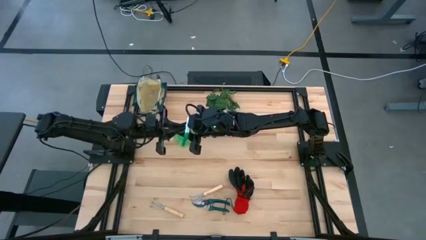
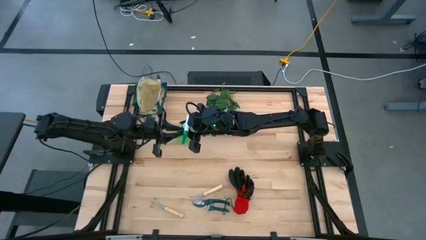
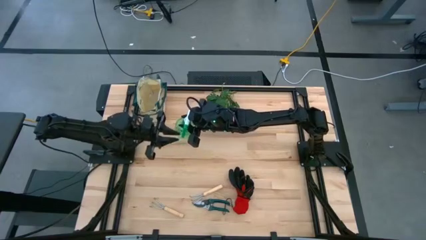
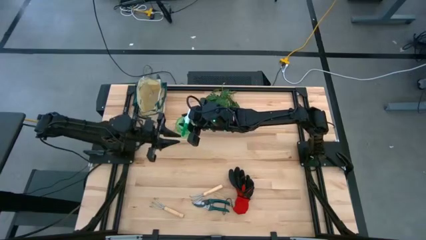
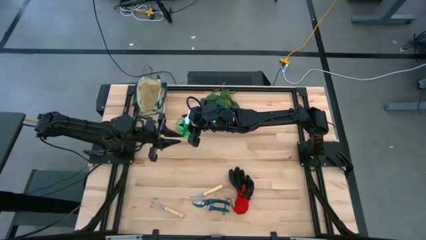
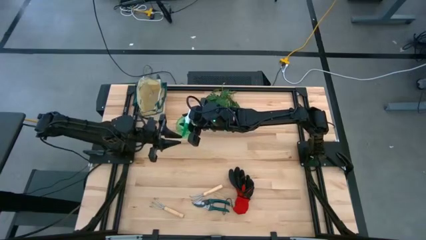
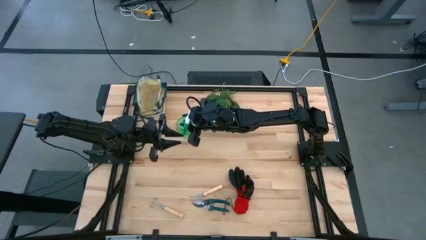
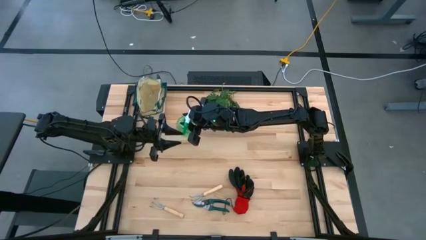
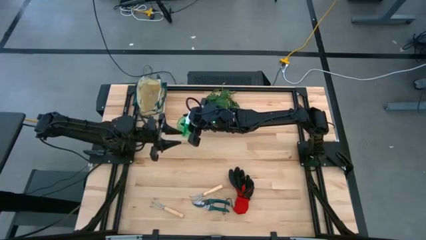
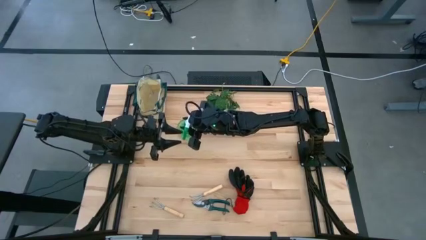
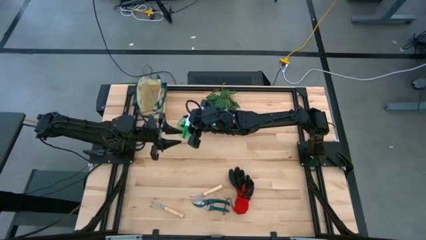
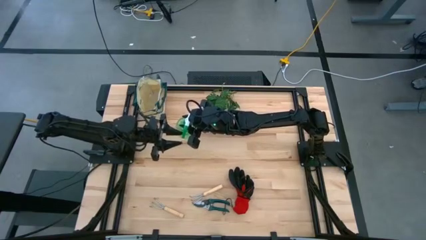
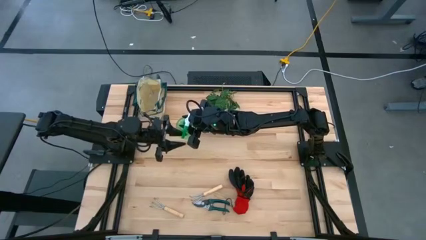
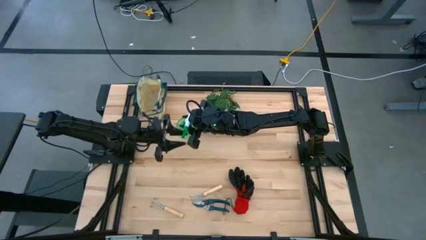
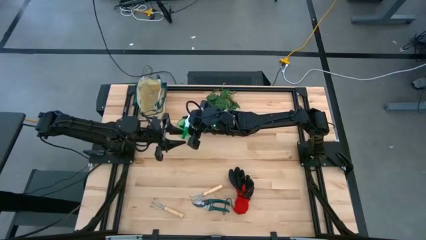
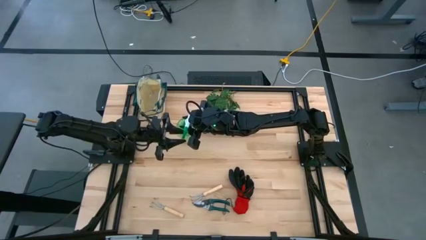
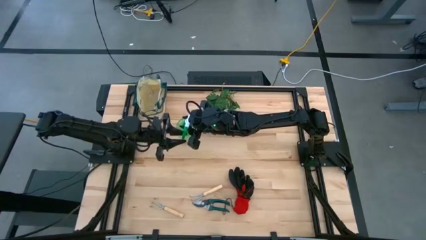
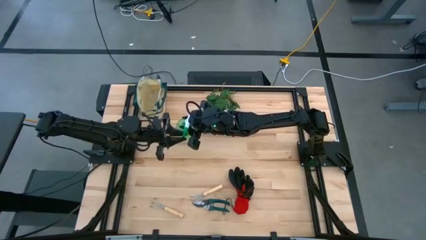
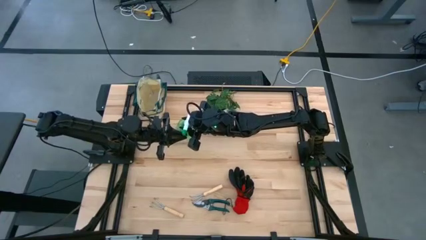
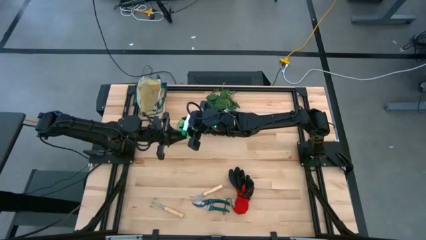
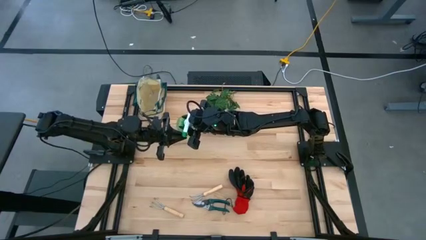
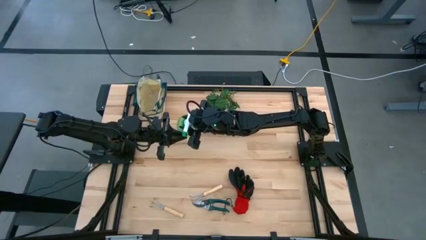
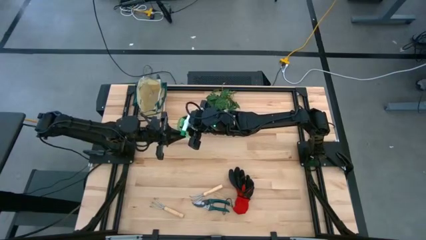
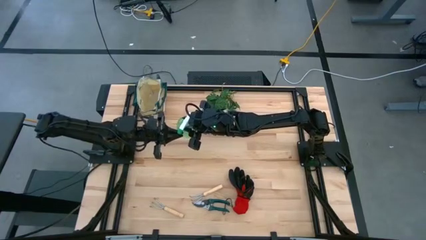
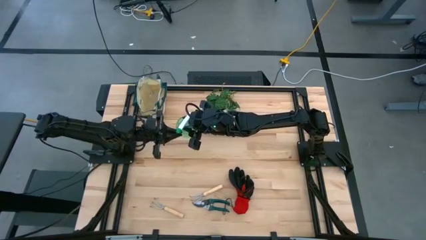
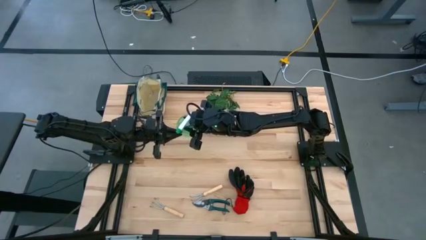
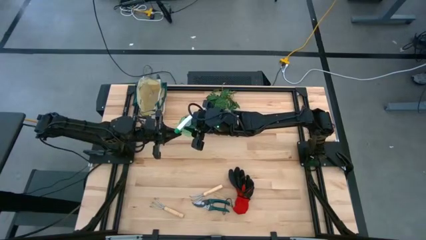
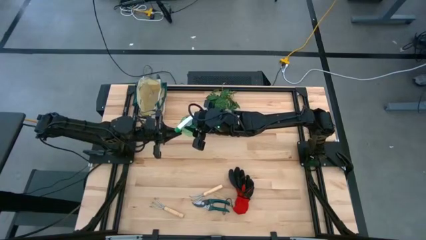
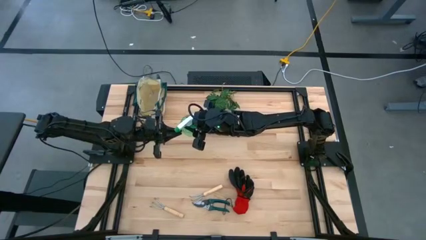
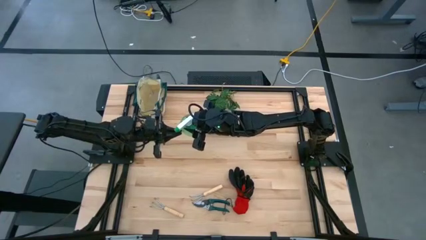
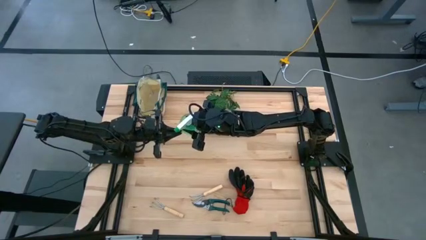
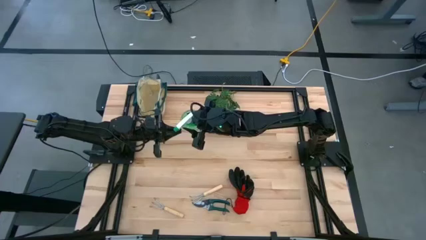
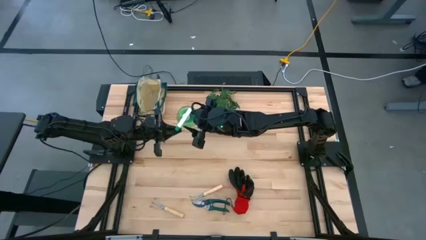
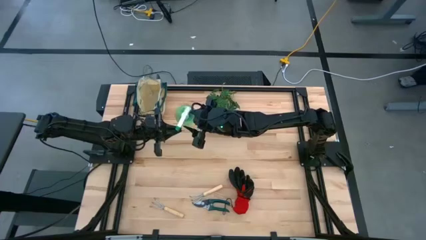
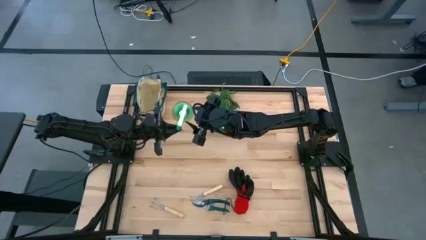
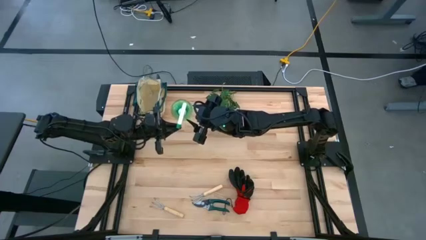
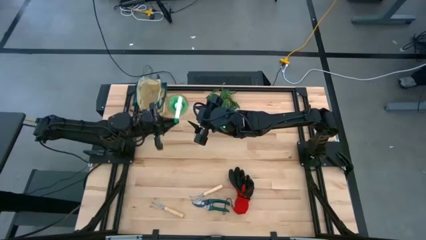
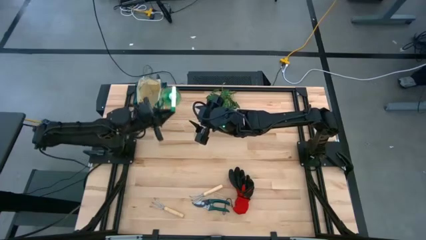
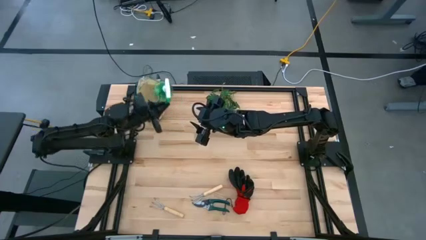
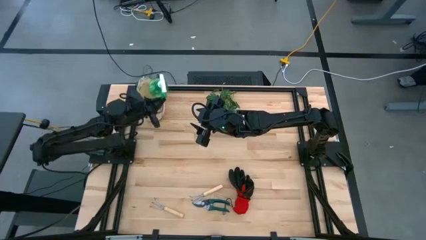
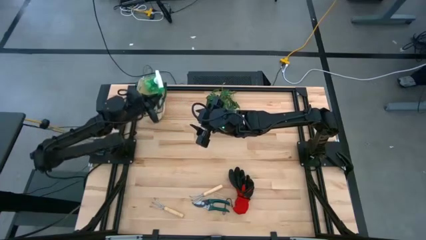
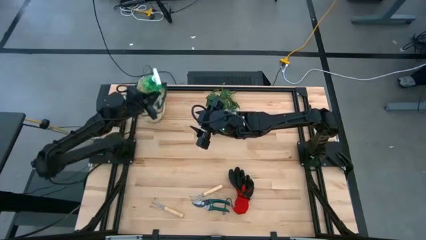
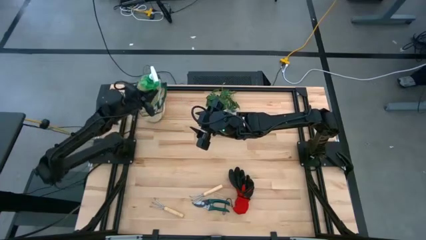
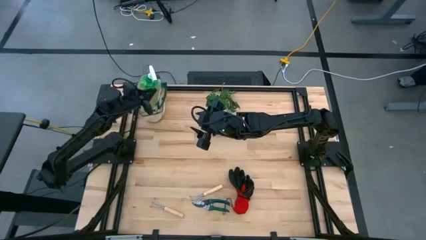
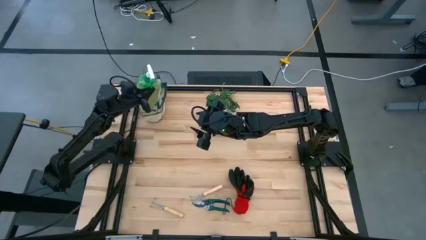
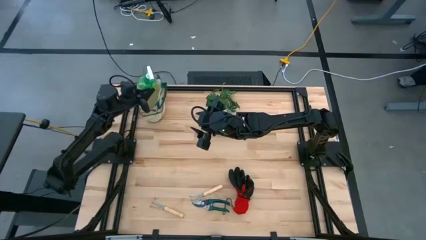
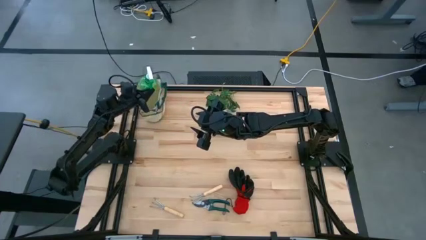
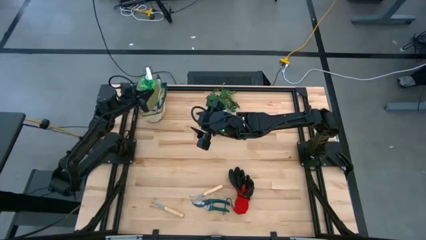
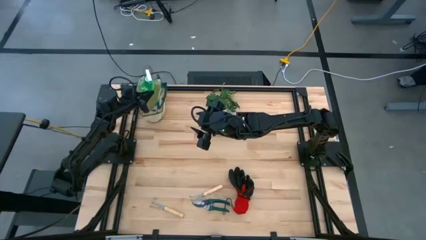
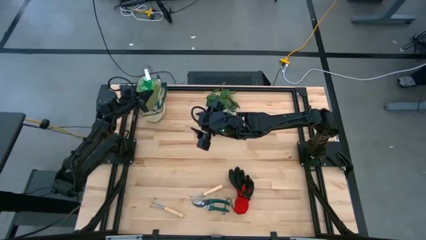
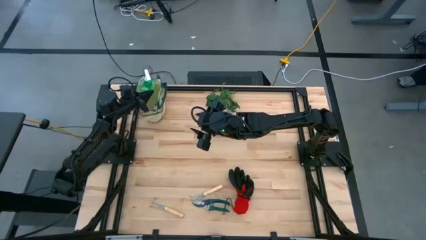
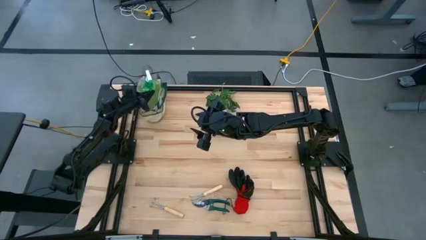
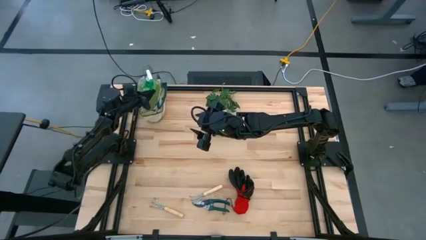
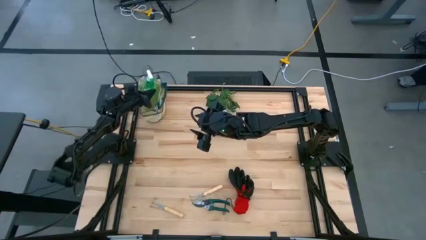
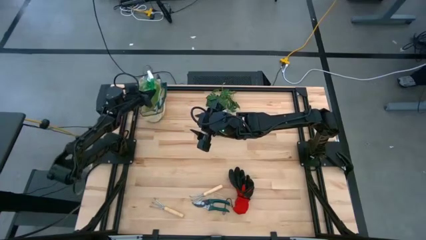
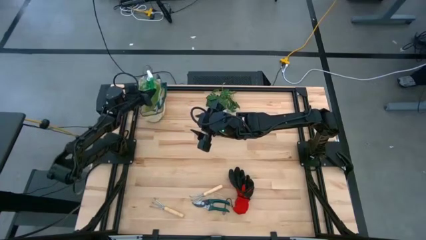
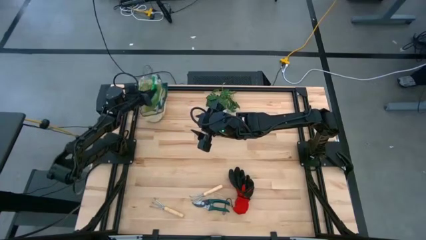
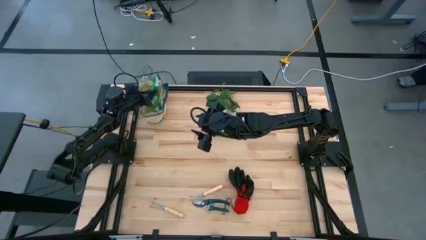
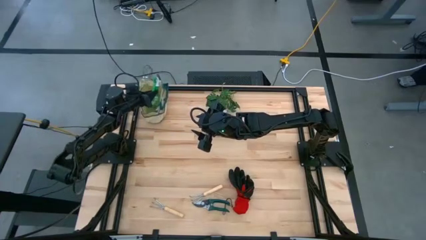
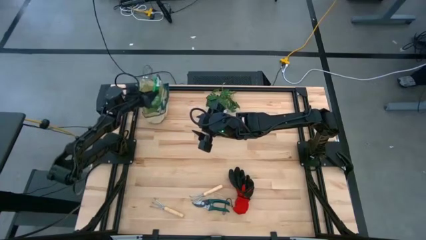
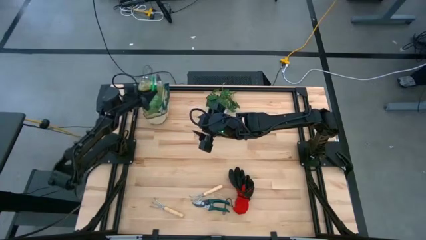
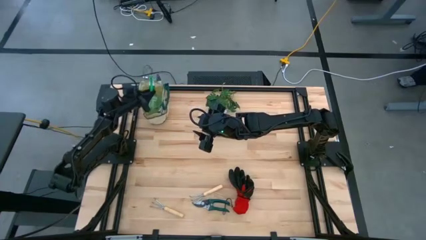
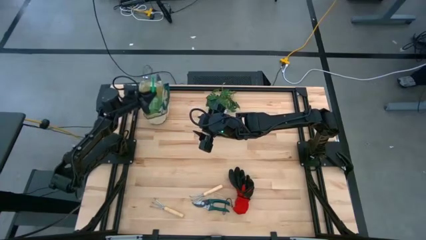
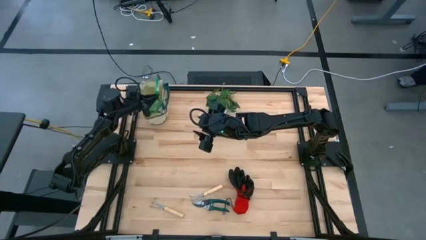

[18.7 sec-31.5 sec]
Task: Pick & Place Garden tools in Gardening bag
Put the green spray bottle into the green gardening bag

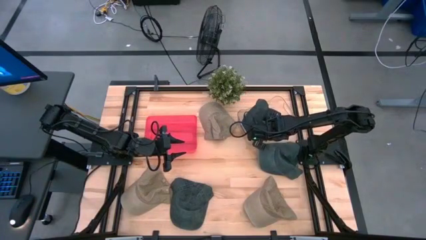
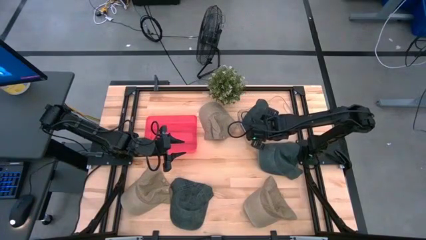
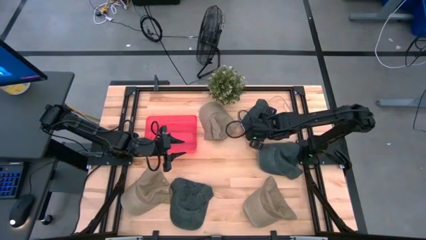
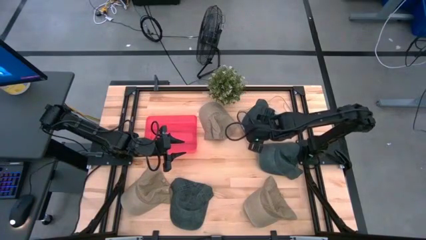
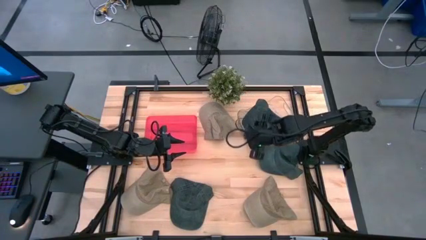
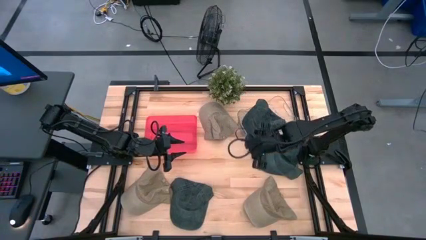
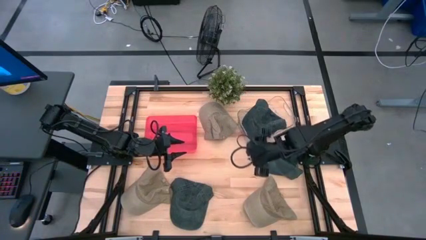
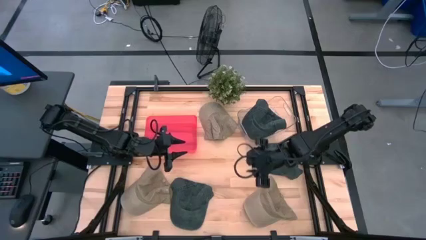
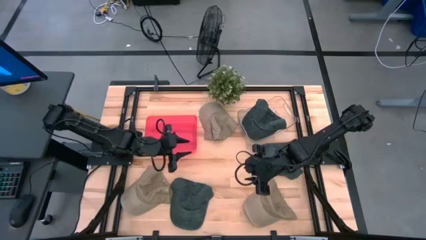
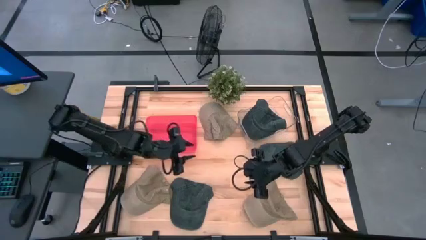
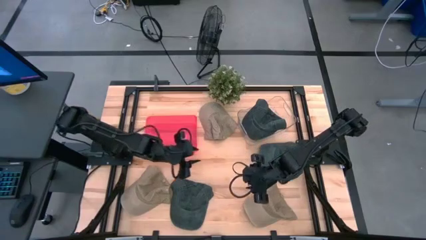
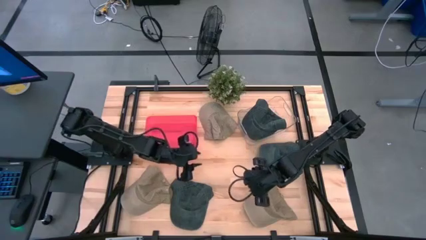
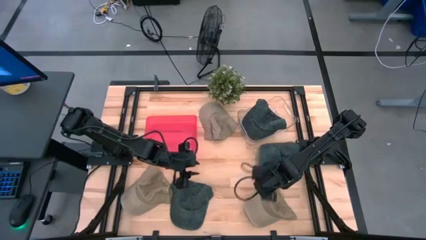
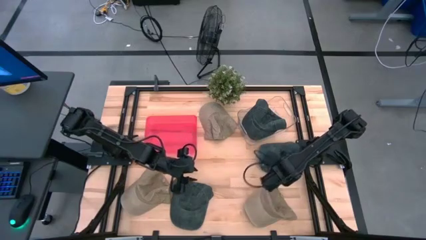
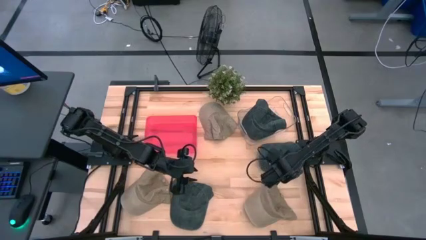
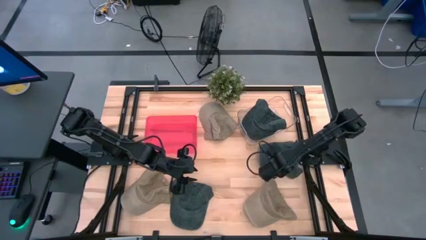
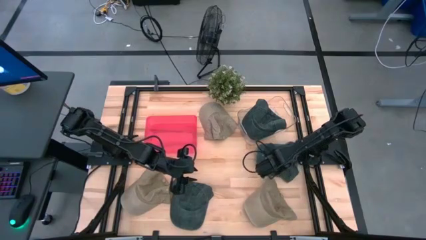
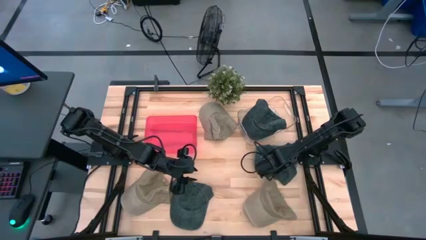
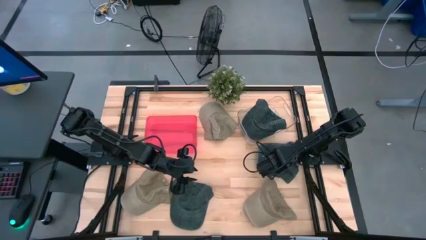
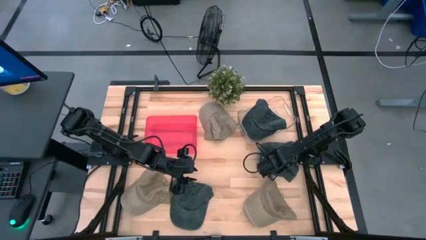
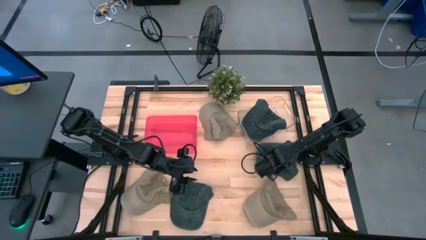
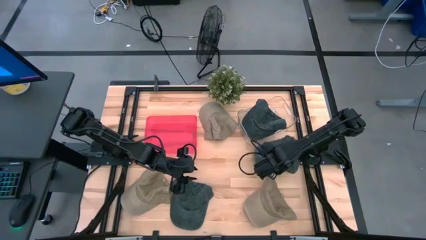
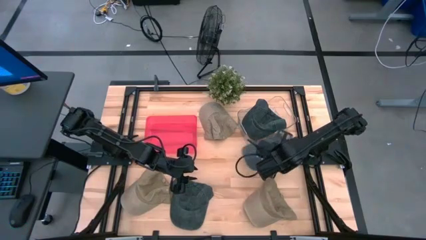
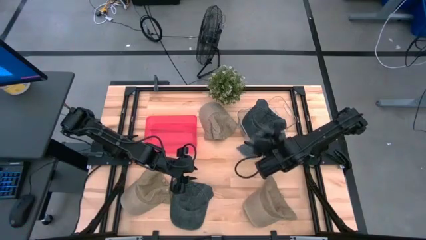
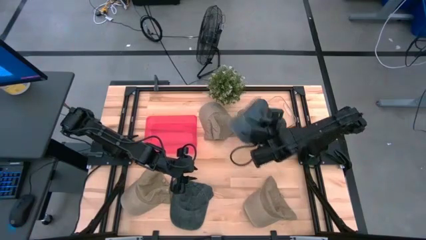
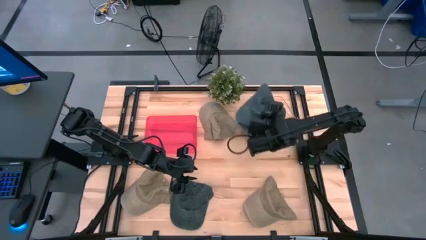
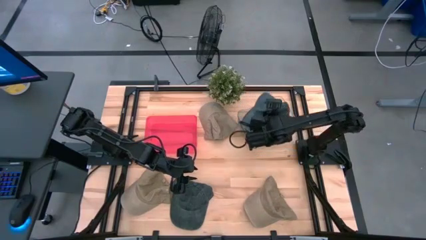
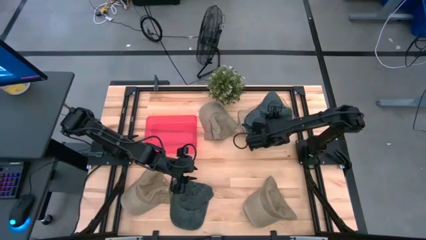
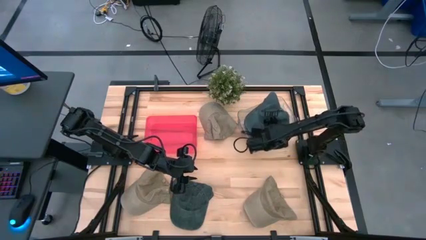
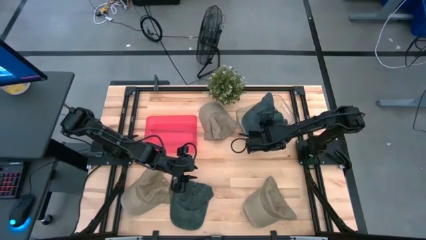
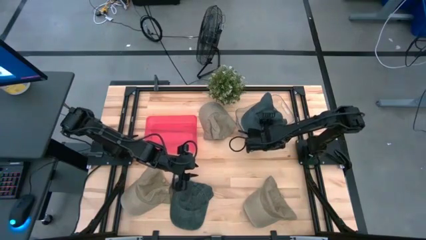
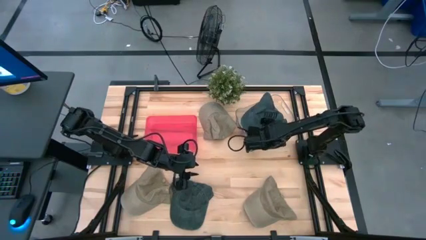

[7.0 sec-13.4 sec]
Task: Pick & Place hat
Put the right black cap into the transparent bin
